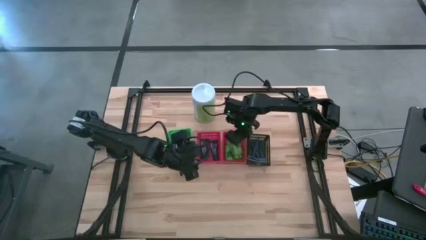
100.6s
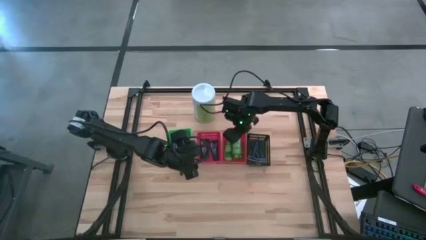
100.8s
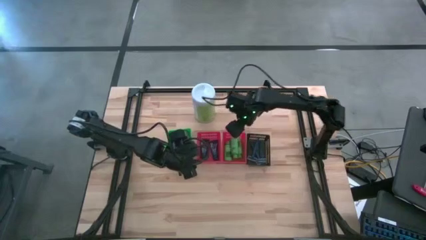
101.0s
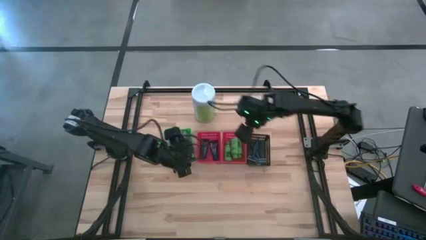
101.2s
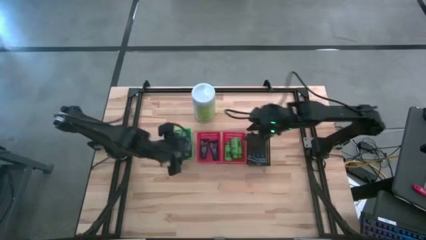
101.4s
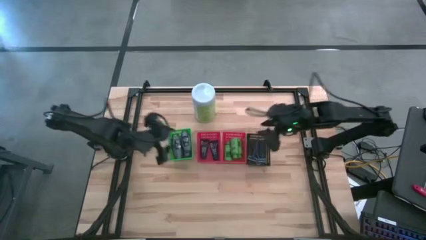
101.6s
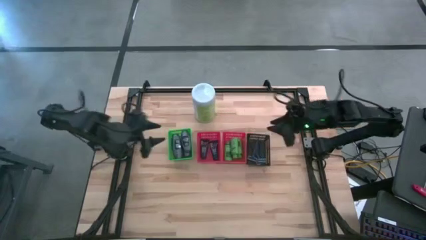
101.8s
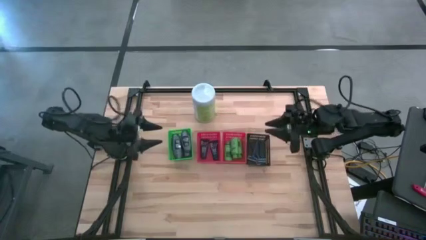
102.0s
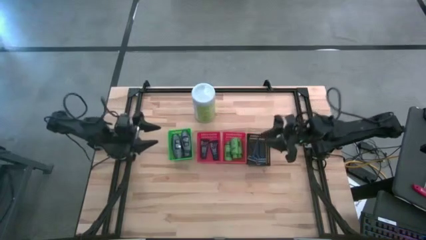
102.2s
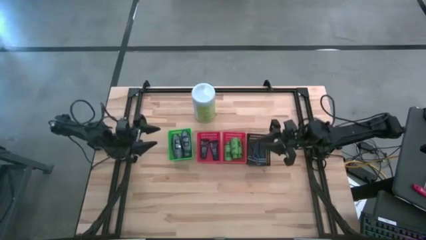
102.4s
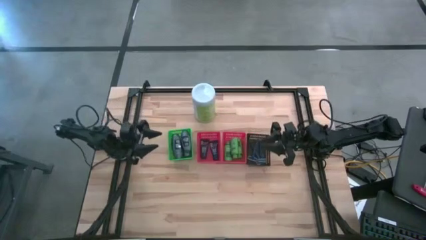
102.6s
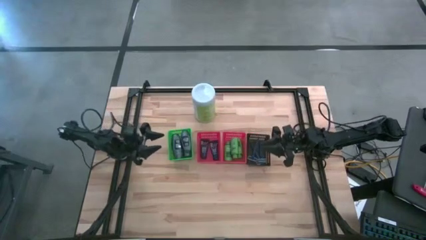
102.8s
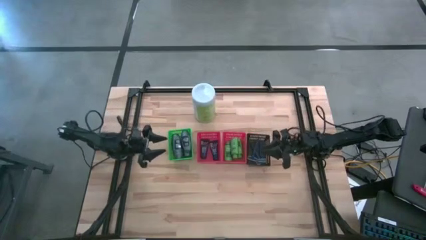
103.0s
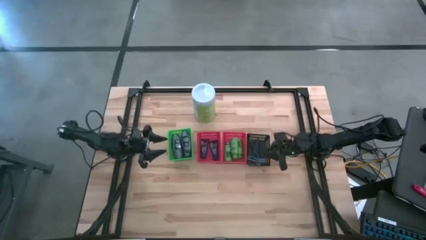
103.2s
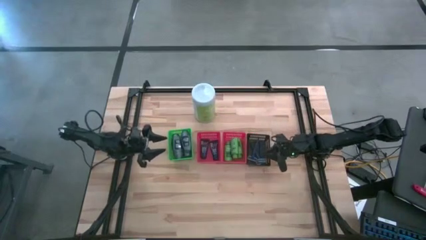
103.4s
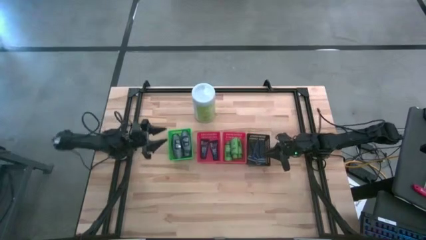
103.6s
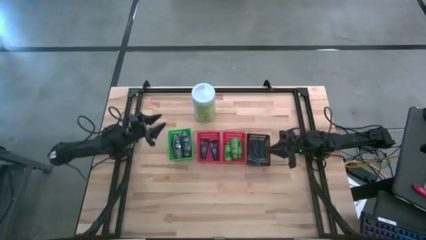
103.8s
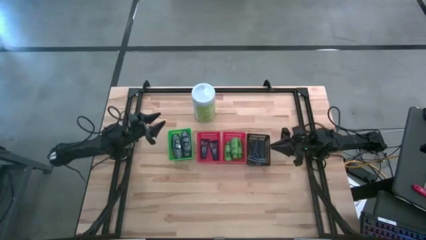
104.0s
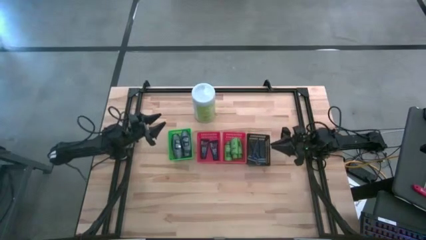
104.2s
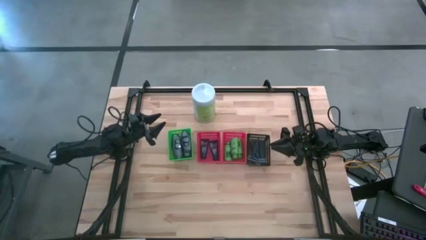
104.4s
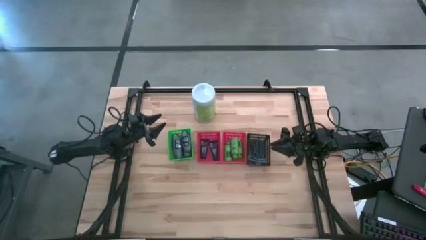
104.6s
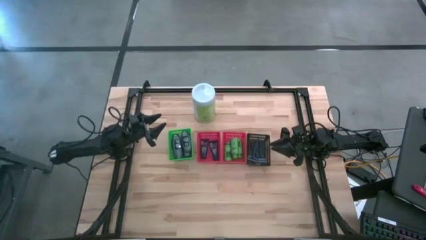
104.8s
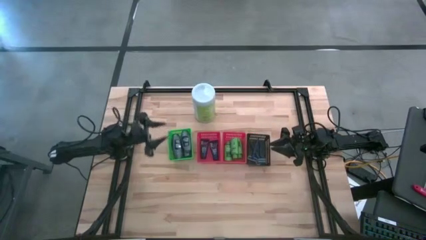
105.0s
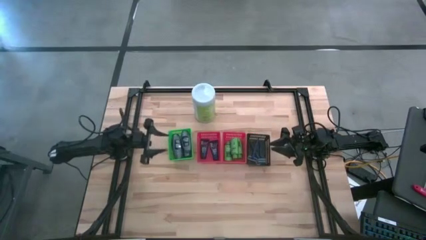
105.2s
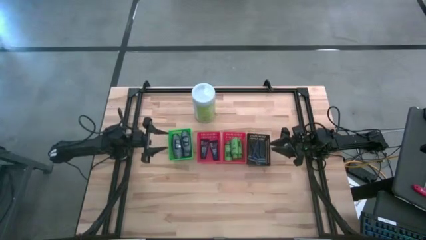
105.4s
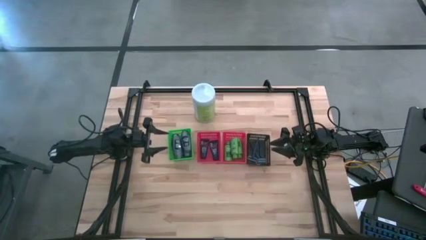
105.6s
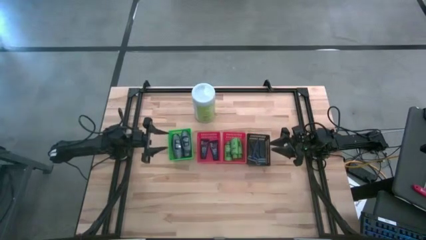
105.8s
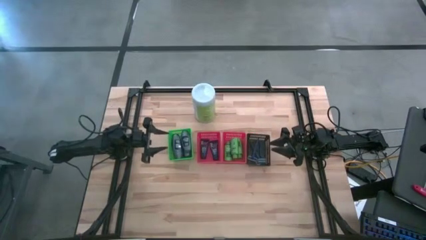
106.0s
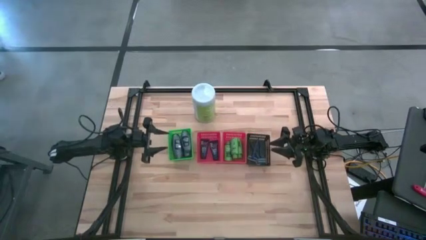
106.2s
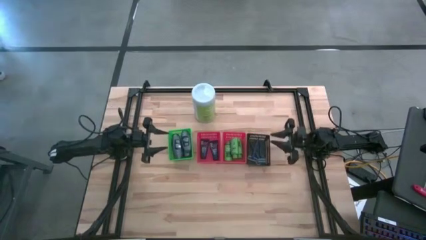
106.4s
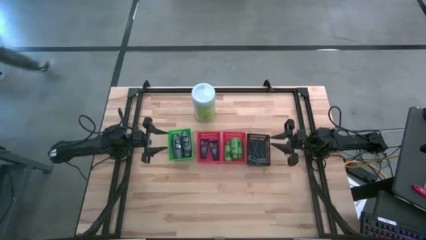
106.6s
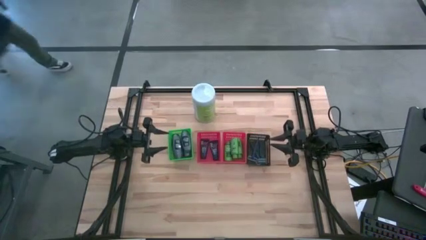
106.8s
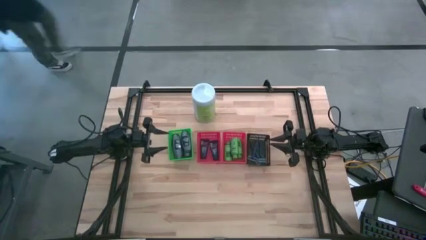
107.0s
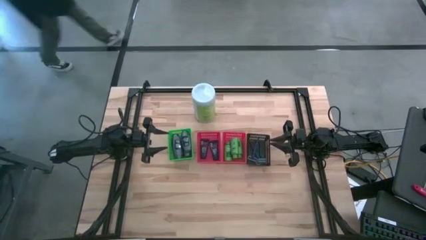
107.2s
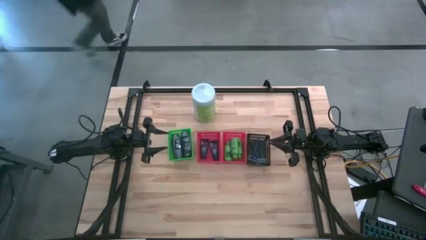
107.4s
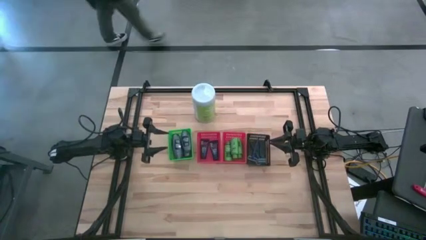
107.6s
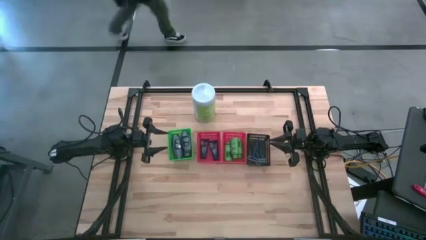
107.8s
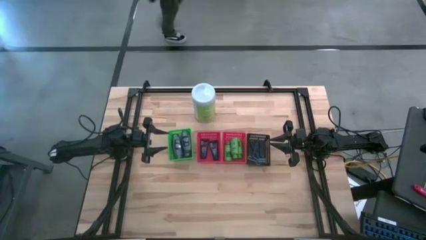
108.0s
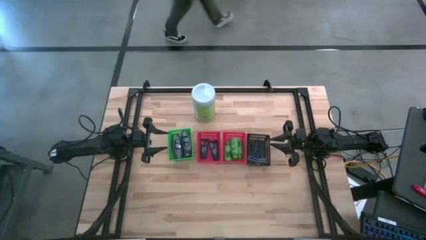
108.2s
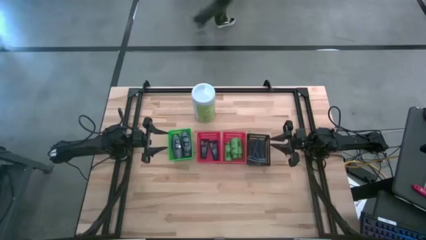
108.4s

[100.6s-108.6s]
Task: Pick & Place Travel size toiletries
Return to Home Position

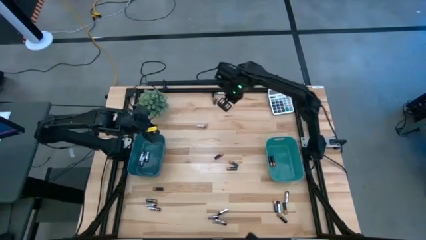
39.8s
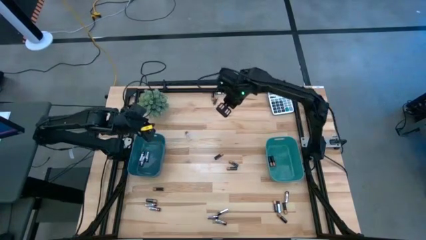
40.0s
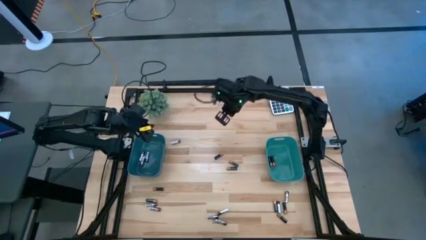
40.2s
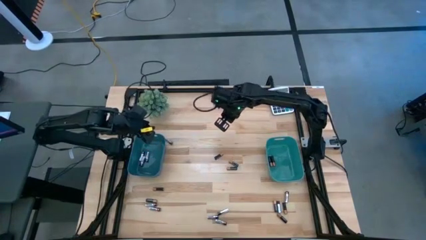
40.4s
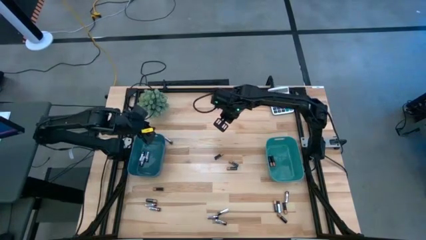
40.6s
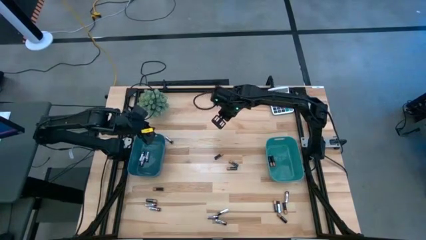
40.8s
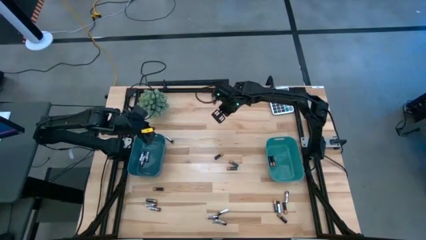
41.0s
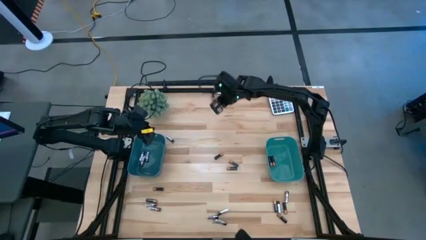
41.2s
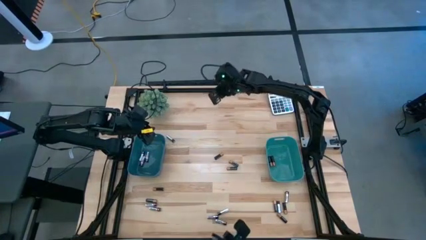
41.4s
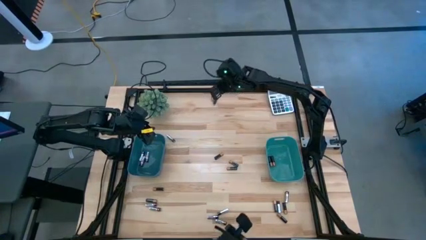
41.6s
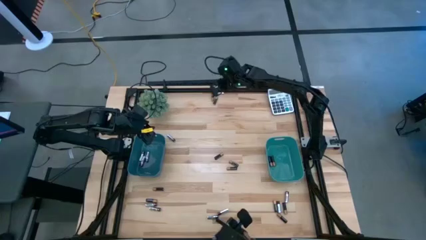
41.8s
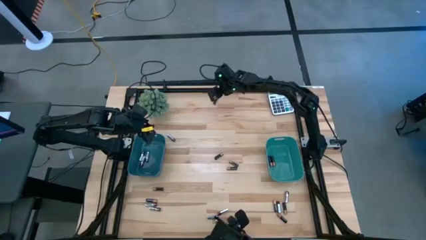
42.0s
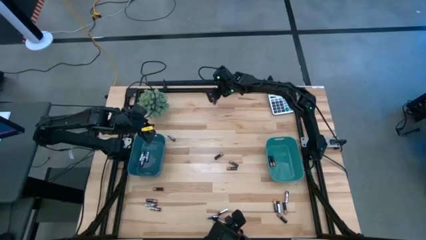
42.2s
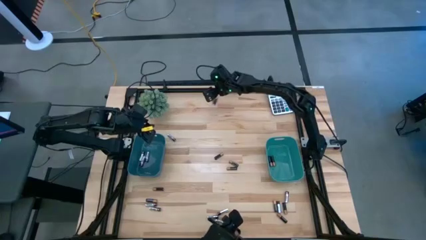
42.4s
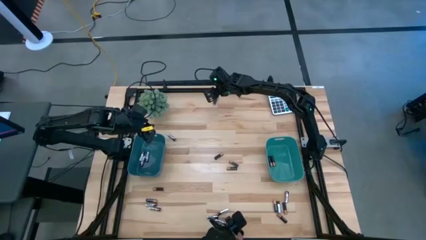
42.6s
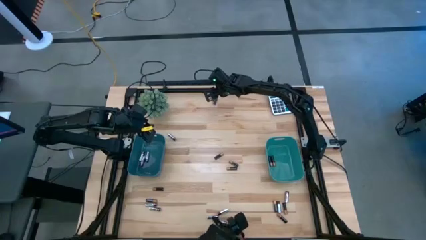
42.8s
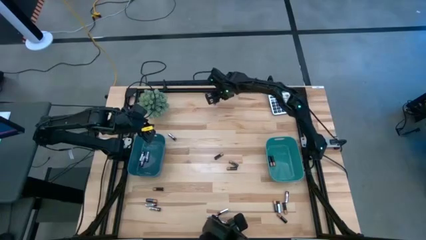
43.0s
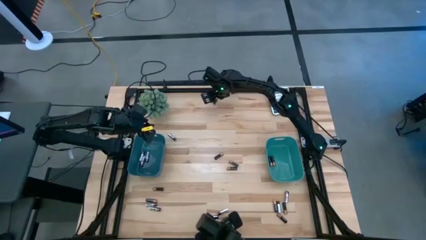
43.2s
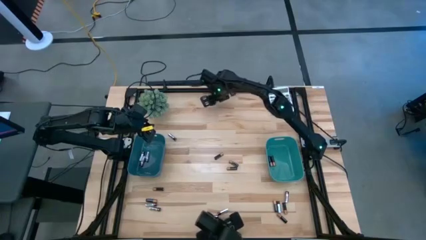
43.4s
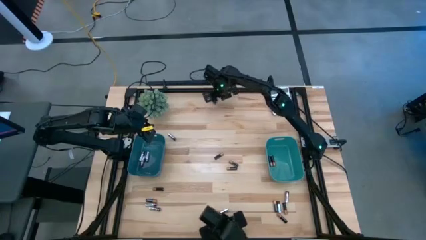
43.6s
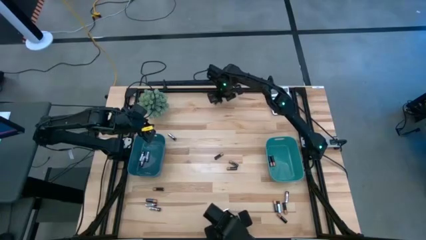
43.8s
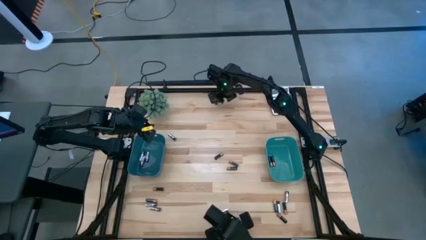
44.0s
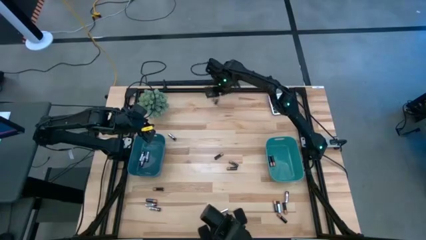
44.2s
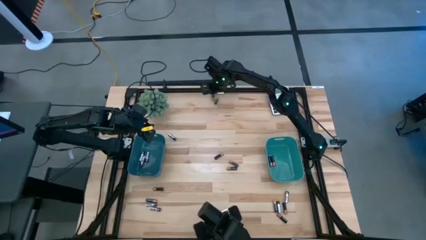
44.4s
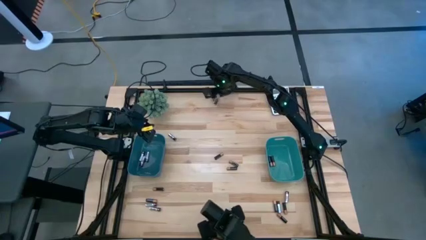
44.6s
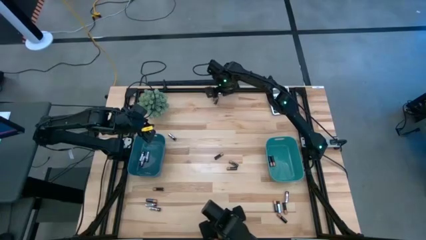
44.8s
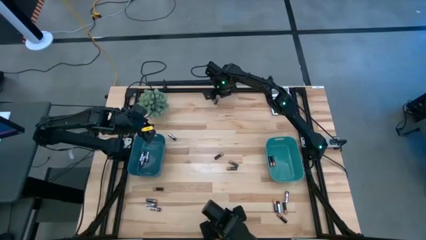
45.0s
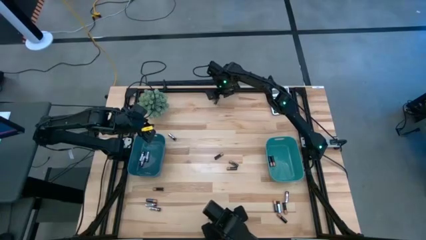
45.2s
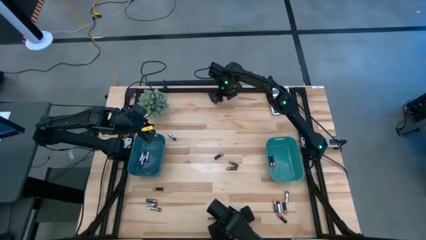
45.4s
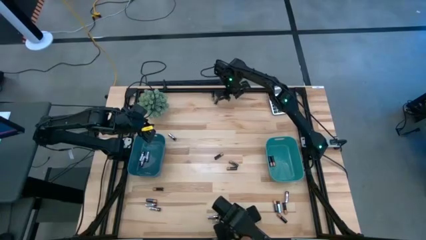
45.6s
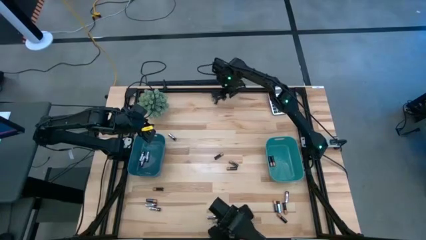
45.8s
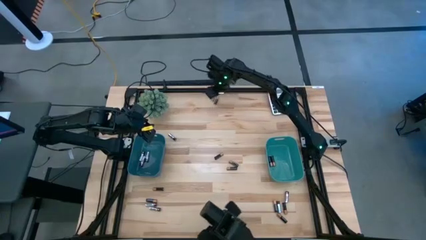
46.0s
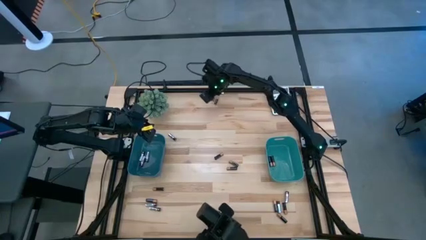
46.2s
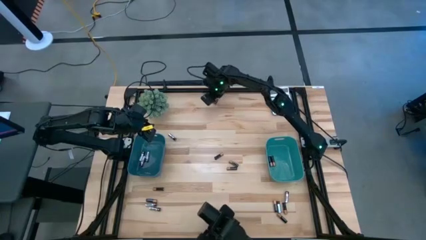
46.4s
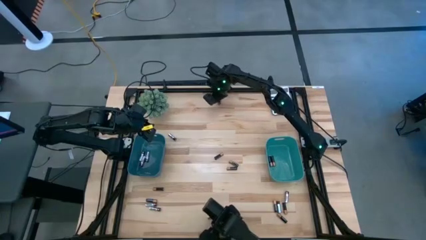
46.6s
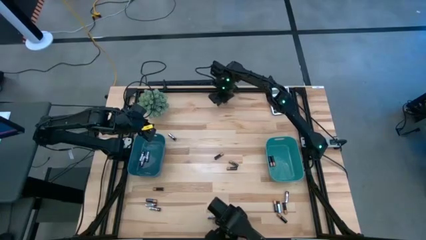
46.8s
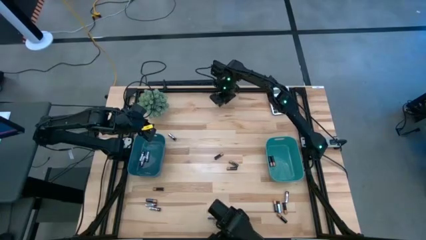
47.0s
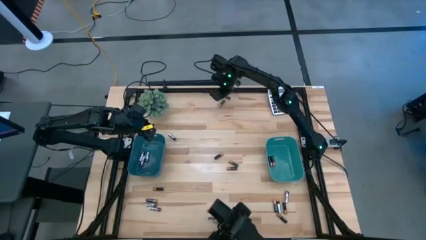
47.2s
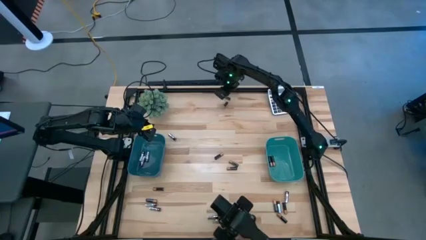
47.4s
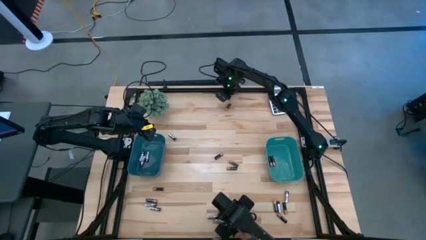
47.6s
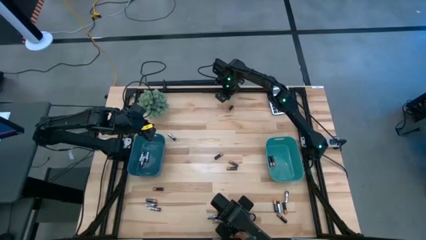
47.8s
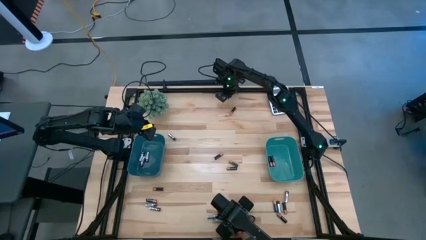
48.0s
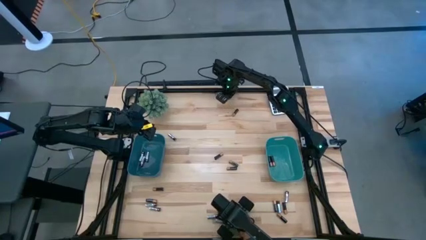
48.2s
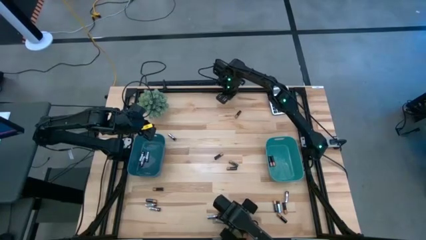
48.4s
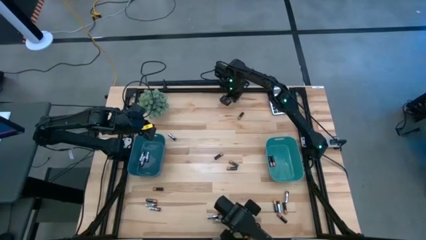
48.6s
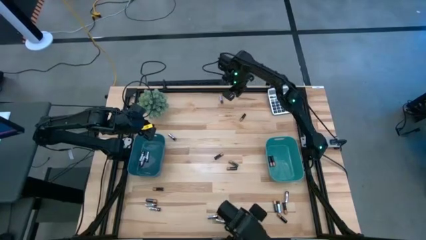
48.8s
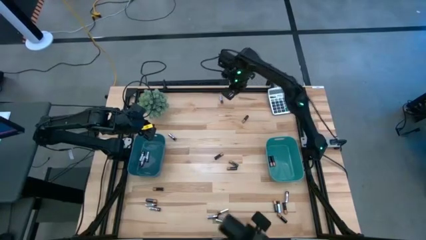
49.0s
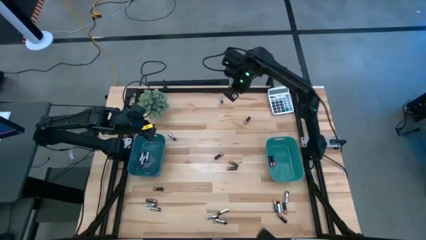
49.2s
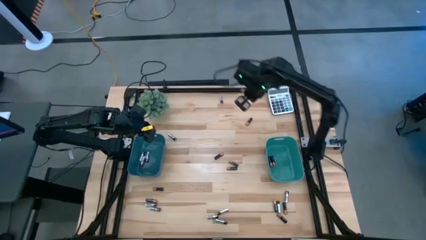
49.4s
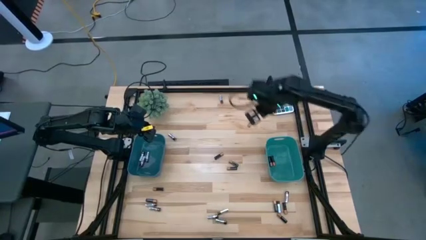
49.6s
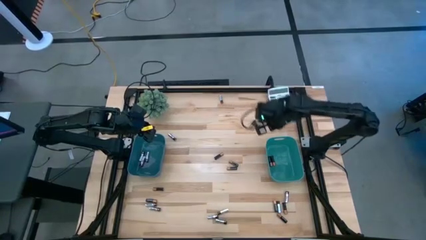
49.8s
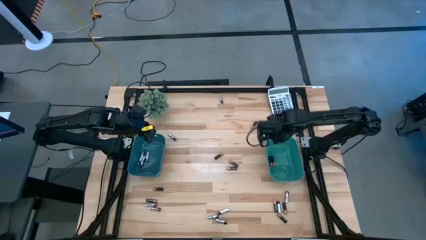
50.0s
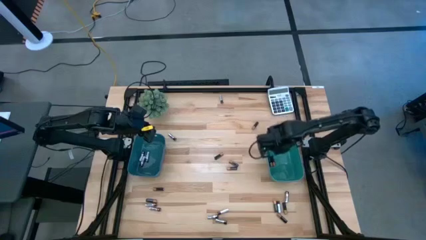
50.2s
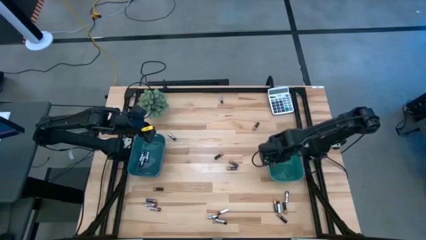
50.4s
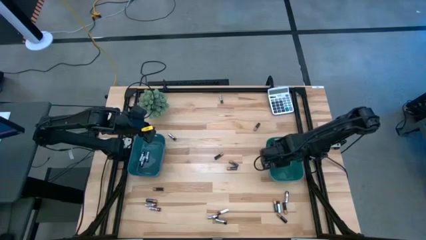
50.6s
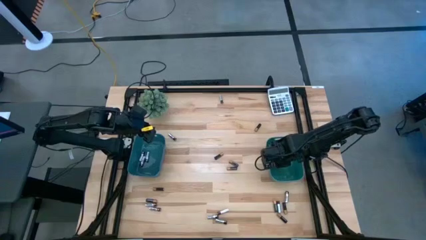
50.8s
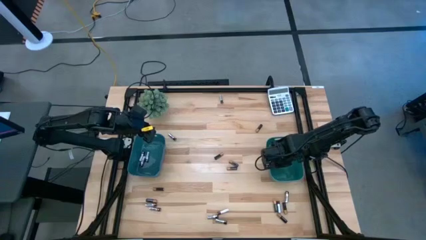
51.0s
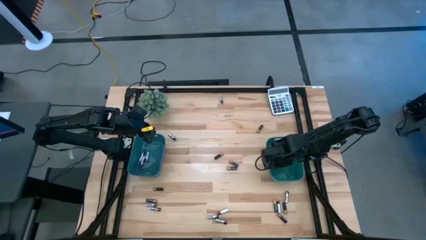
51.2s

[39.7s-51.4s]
Task: Sort batteries
Put the black battery into the green bin
